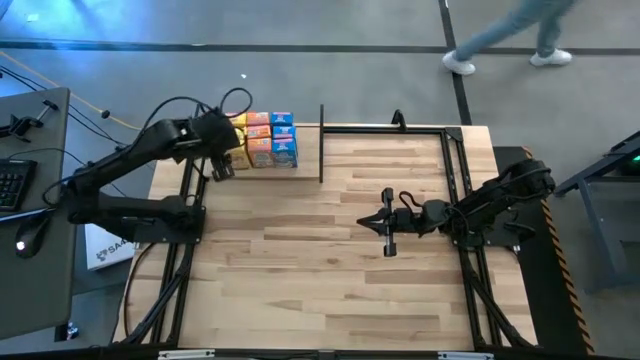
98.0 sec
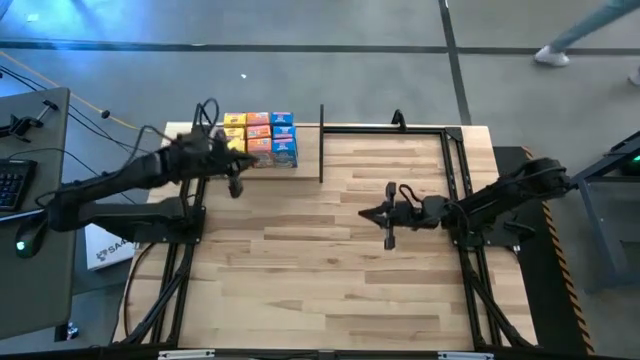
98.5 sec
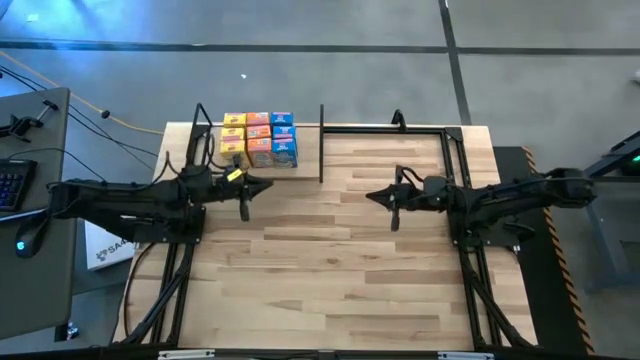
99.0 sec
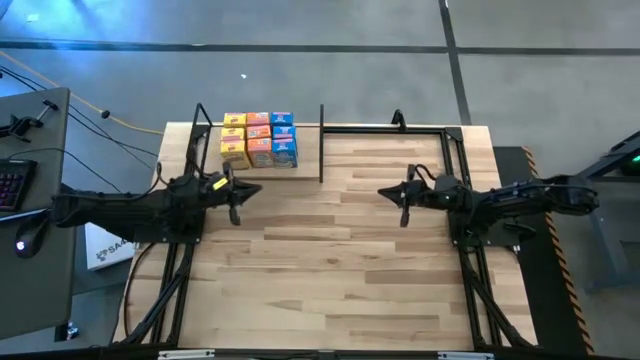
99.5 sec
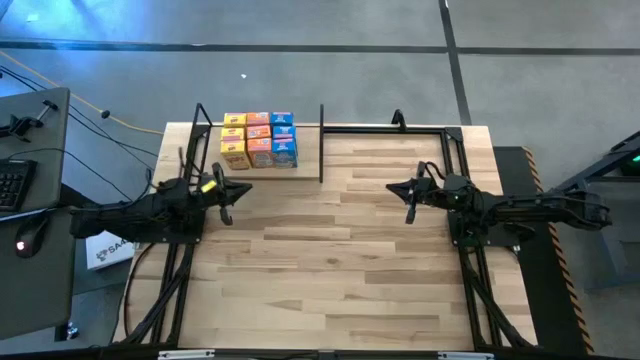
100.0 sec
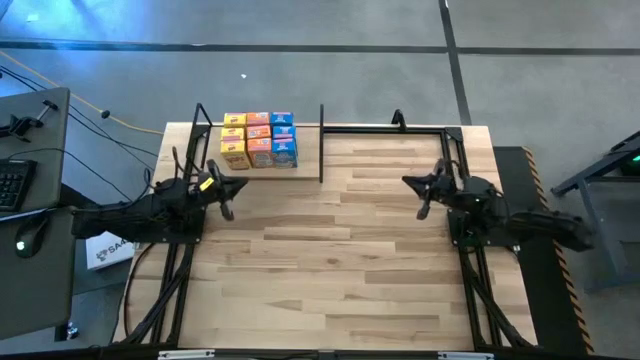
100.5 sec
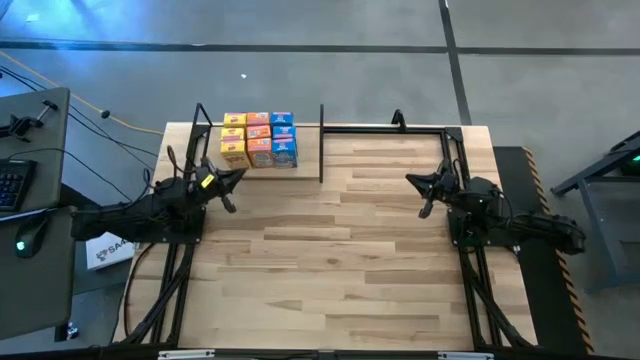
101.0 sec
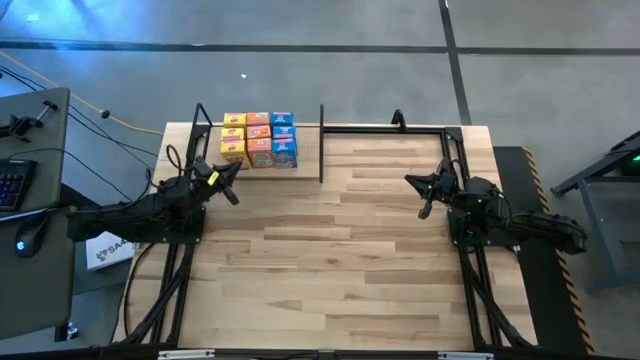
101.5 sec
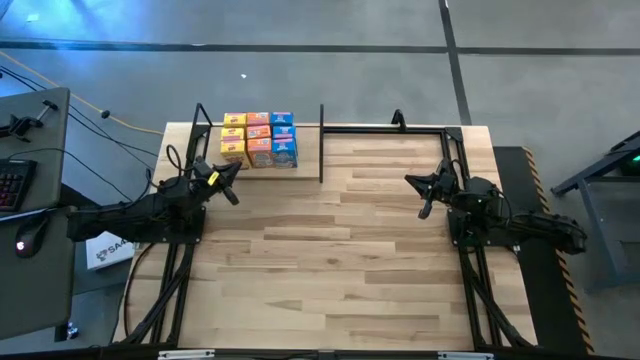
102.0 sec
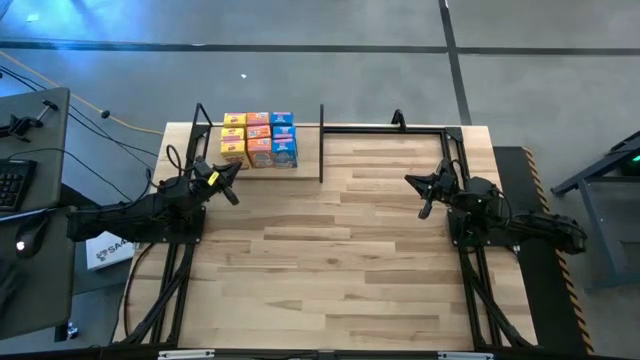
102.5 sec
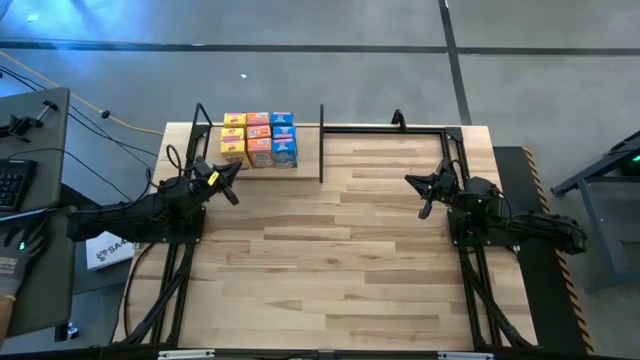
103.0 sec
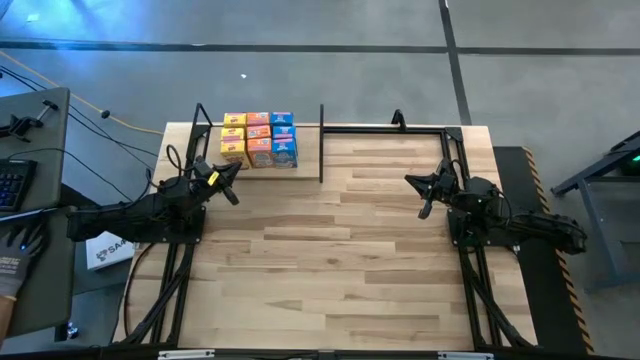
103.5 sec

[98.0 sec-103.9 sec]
Task: Stack cereal on shelf
Return to Home Position

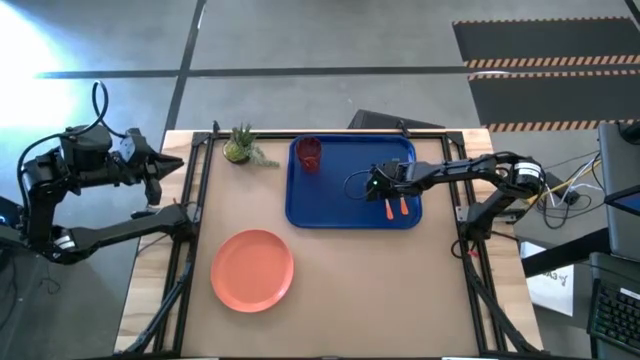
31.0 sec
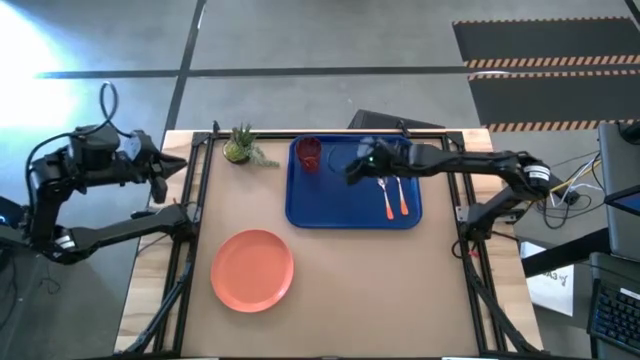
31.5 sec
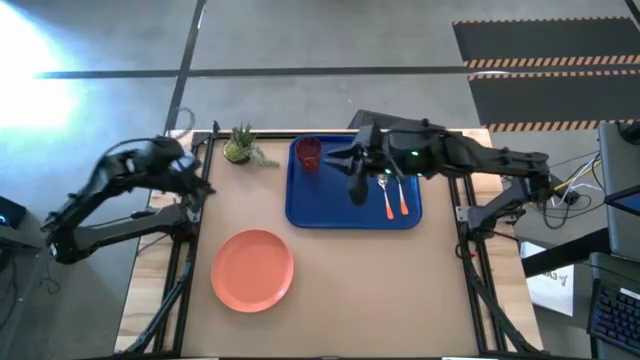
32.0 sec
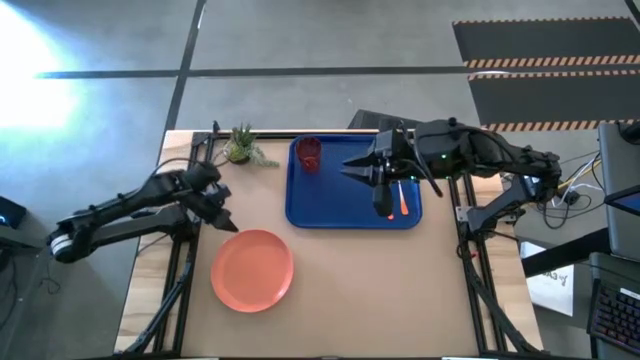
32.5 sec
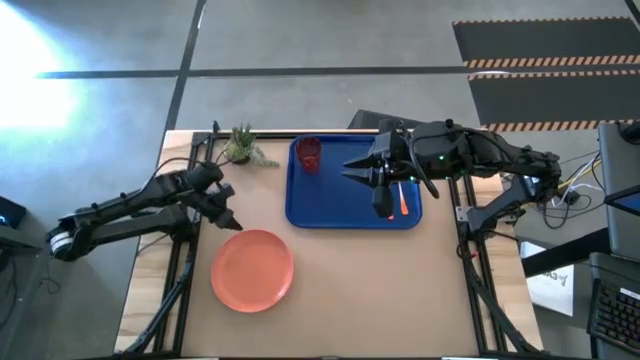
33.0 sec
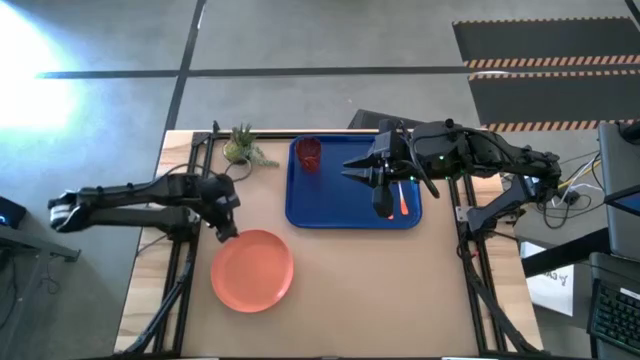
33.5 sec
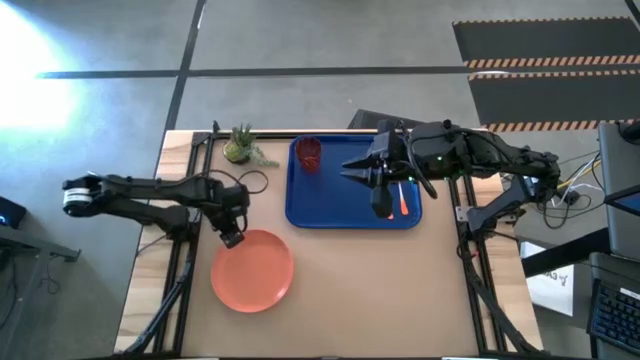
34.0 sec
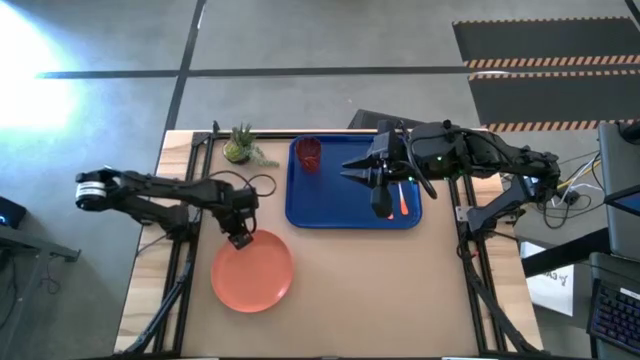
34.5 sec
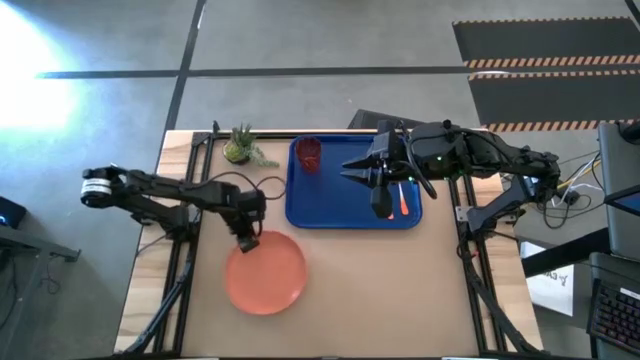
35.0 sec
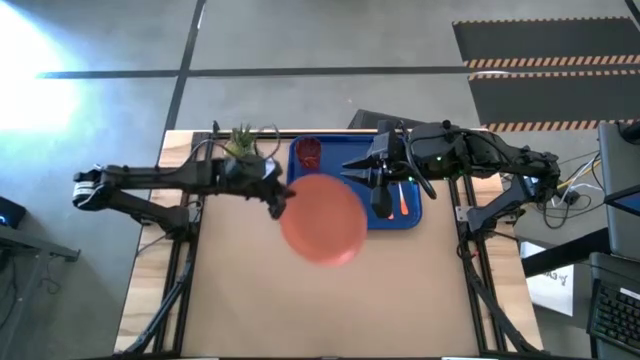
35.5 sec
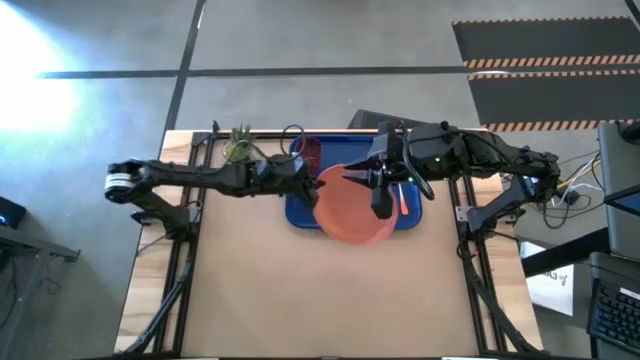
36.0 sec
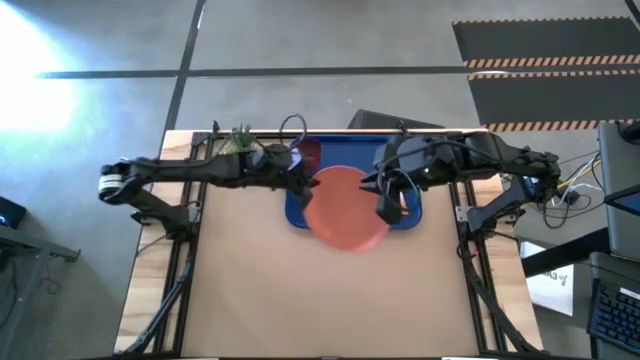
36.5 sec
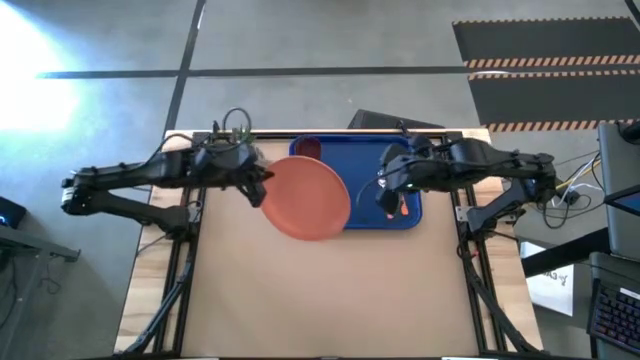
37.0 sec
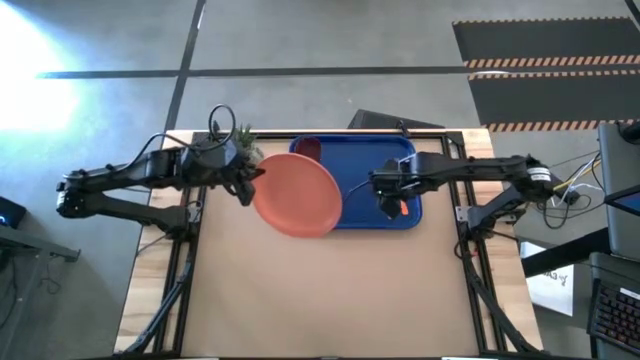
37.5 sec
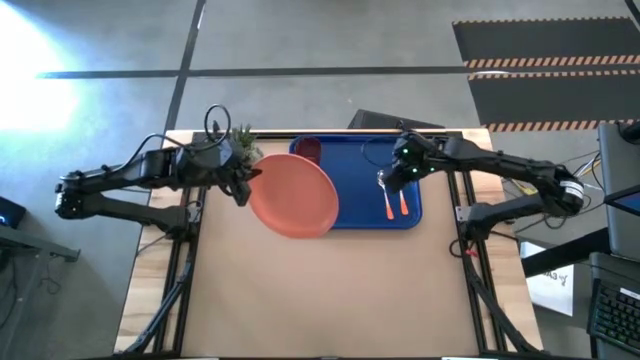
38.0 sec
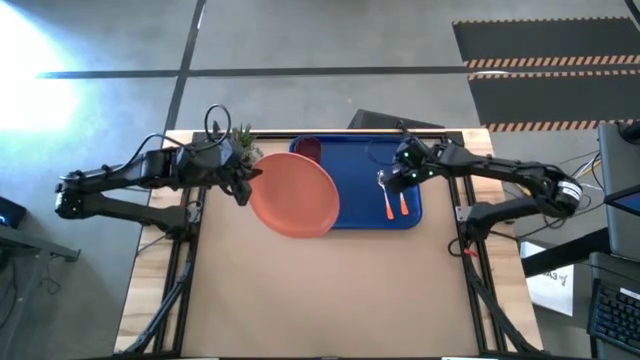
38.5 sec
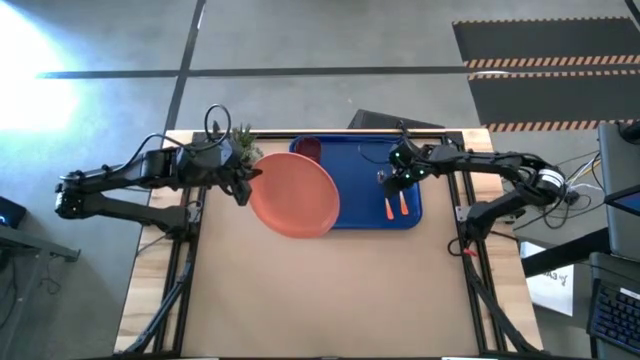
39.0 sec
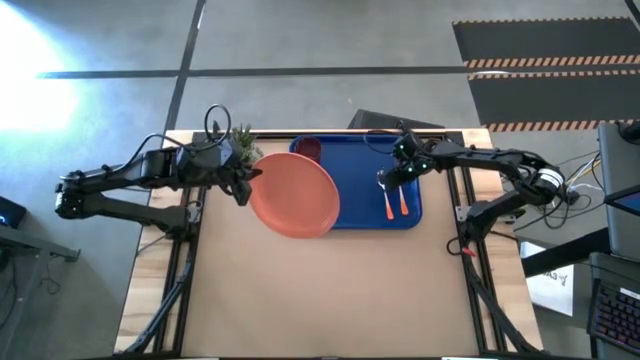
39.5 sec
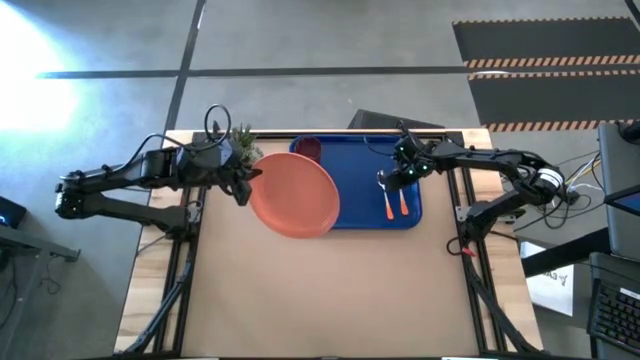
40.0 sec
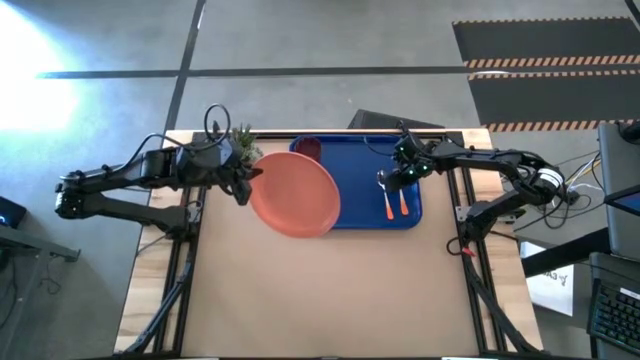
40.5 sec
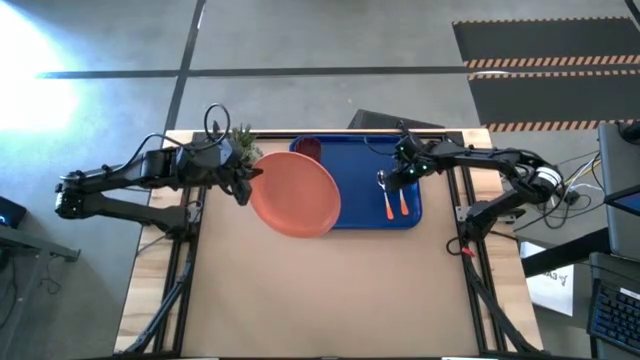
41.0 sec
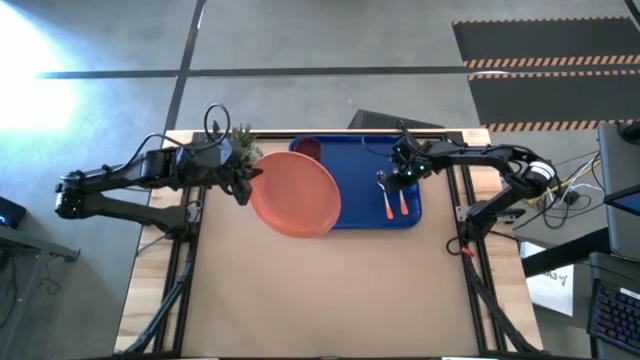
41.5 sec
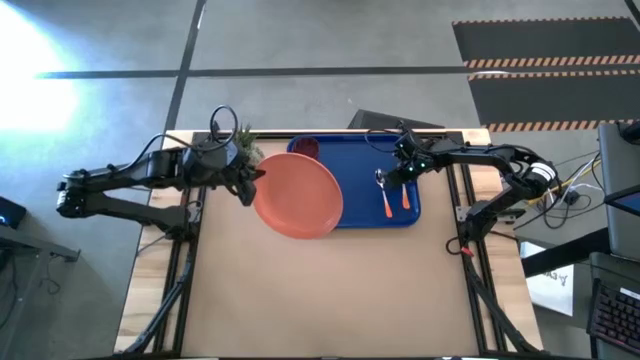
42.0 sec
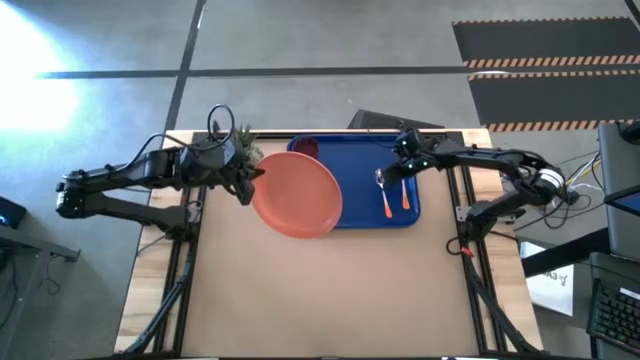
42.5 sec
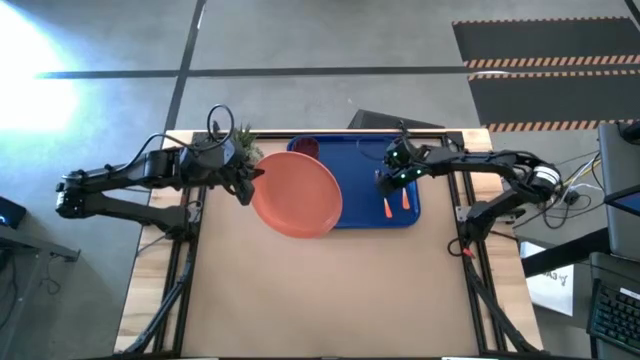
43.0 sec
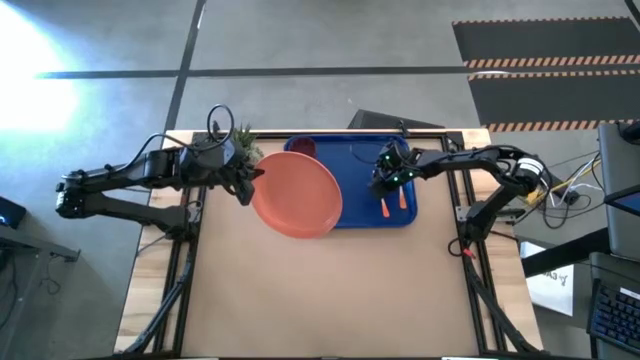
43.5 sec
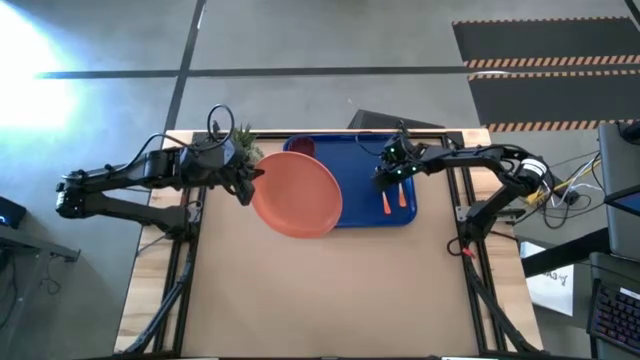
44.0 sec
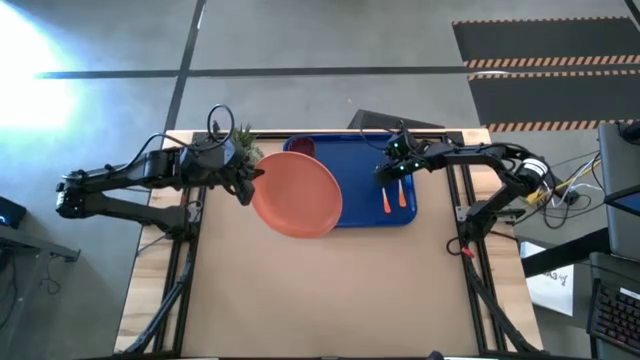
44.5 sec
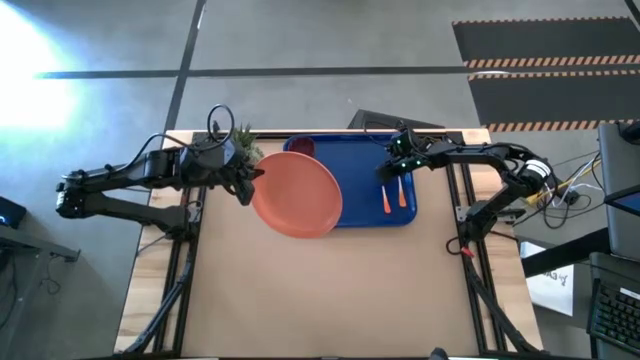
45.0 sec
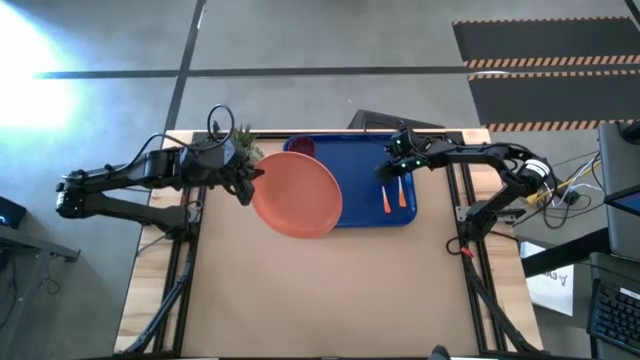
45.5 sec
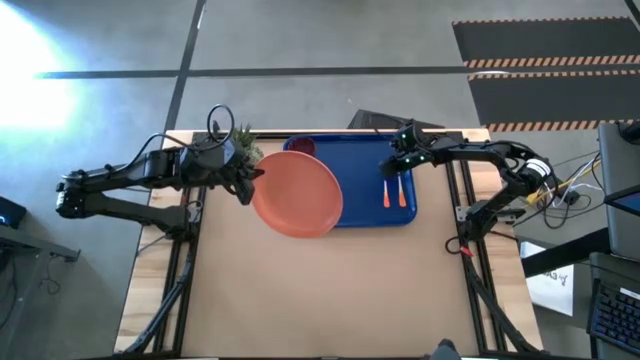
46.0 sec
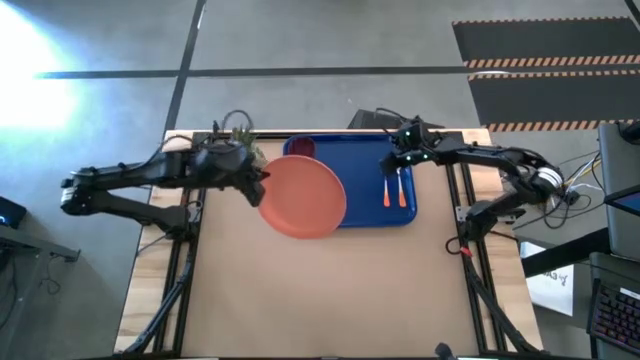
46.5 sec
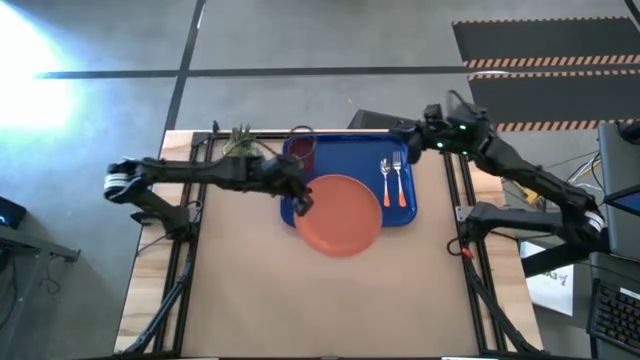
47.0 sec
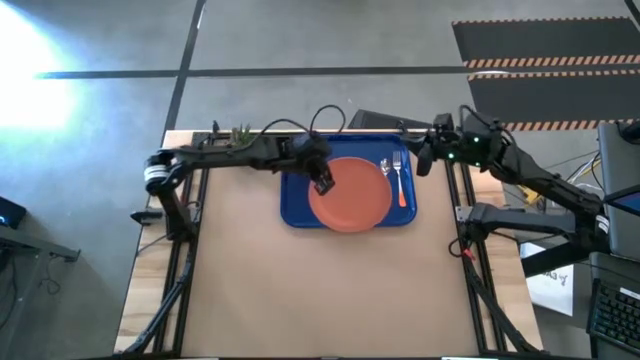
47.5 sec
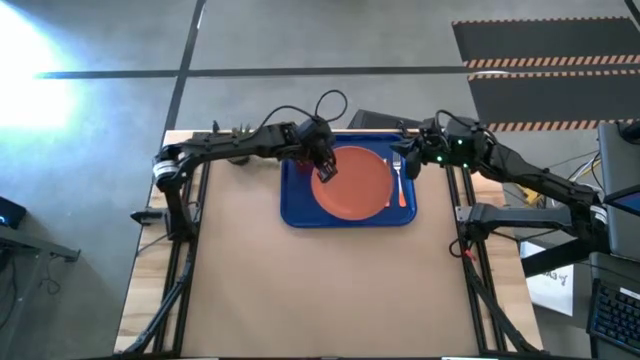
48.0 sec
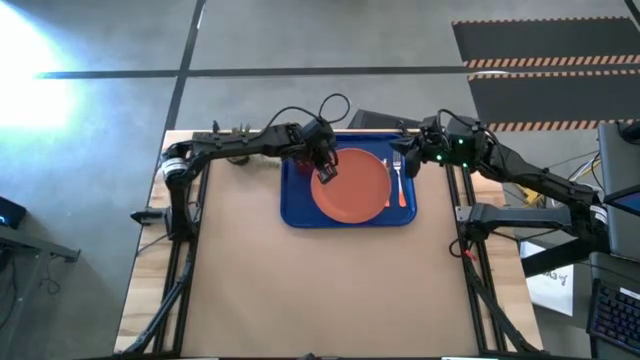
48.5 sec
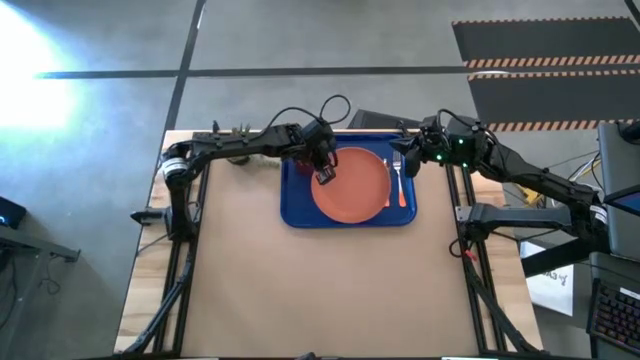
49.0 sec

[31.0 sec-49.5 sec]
Task: Pick and place plate/cup/fork/spoon on tray
Put the plate on the center of the serving tray
